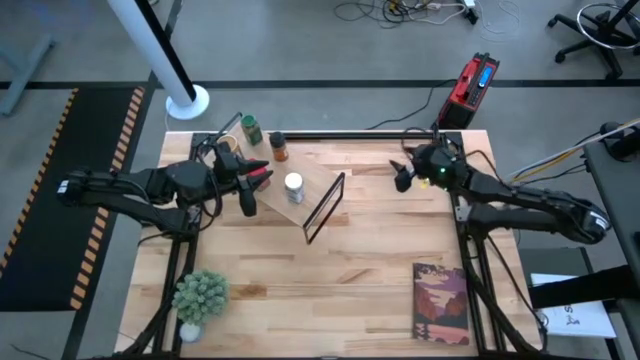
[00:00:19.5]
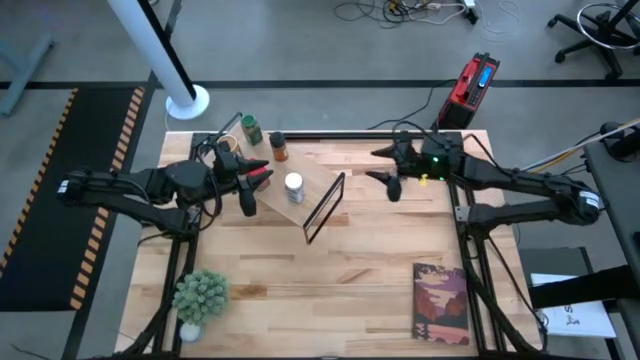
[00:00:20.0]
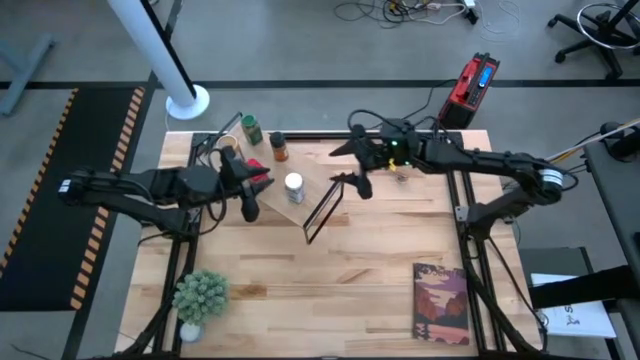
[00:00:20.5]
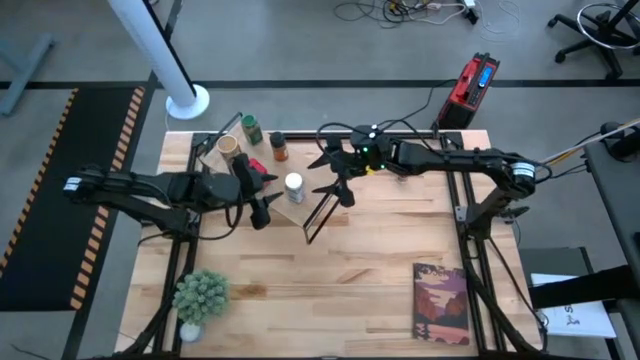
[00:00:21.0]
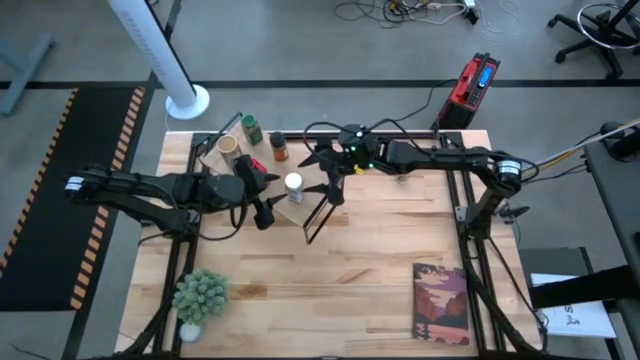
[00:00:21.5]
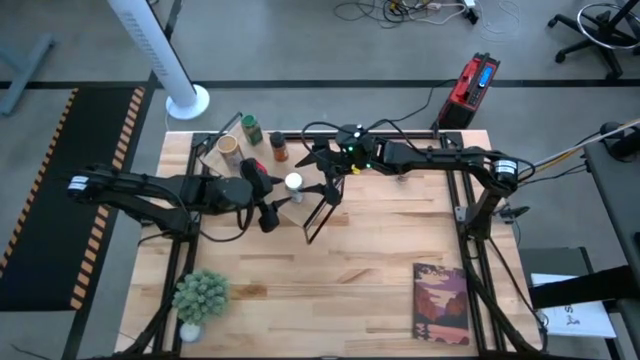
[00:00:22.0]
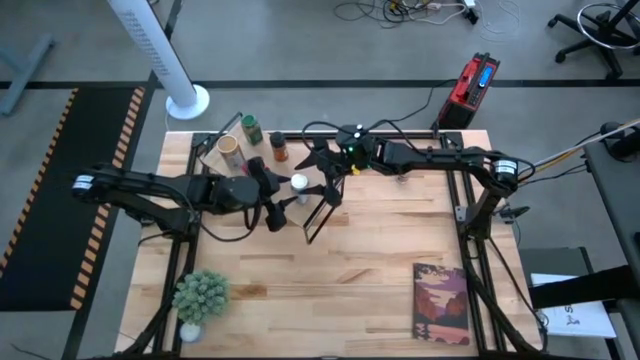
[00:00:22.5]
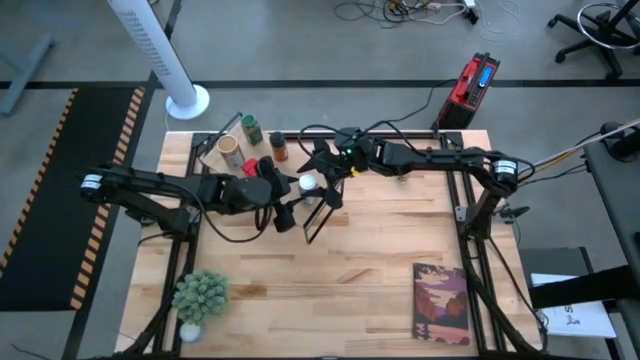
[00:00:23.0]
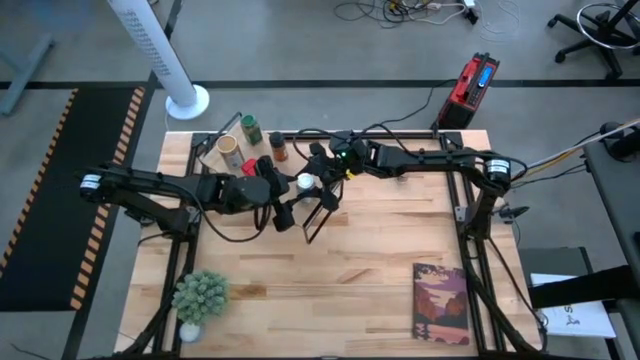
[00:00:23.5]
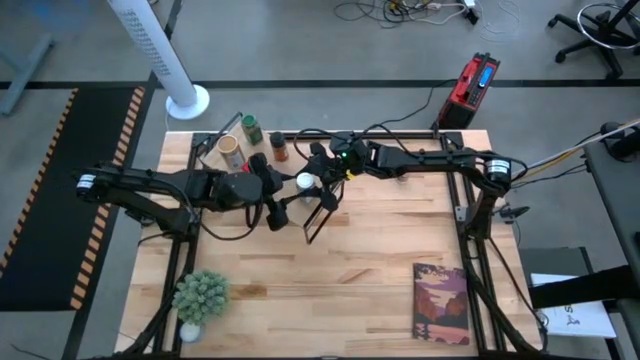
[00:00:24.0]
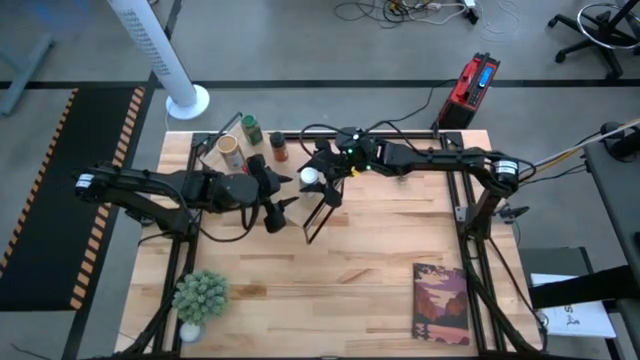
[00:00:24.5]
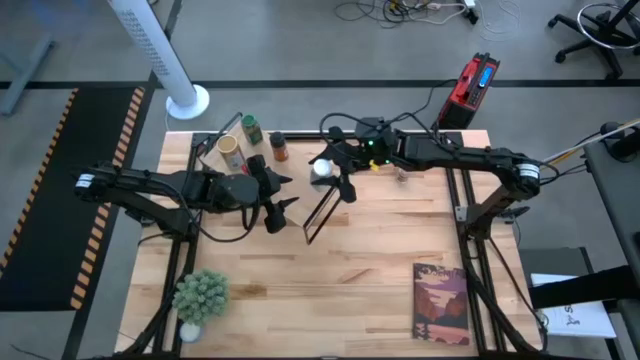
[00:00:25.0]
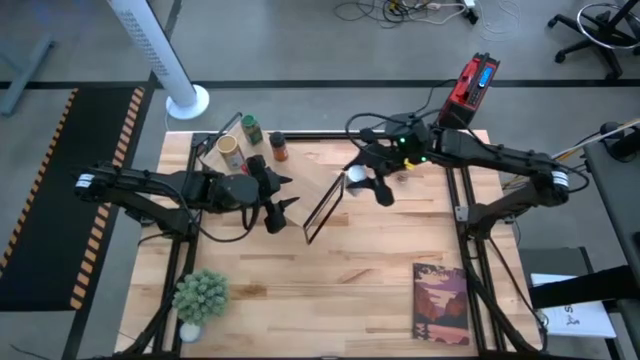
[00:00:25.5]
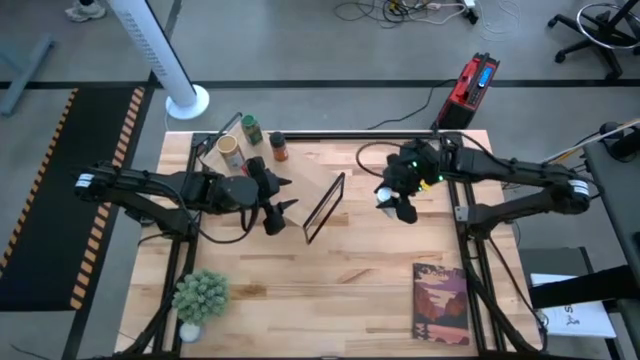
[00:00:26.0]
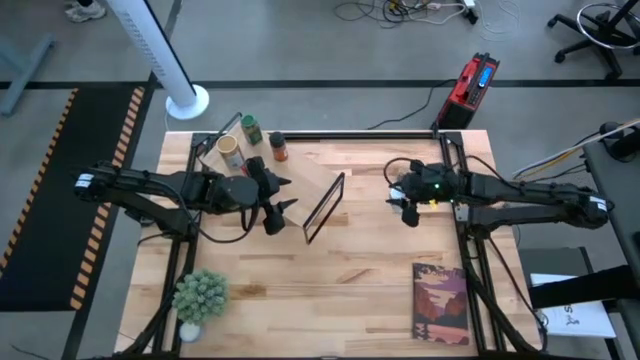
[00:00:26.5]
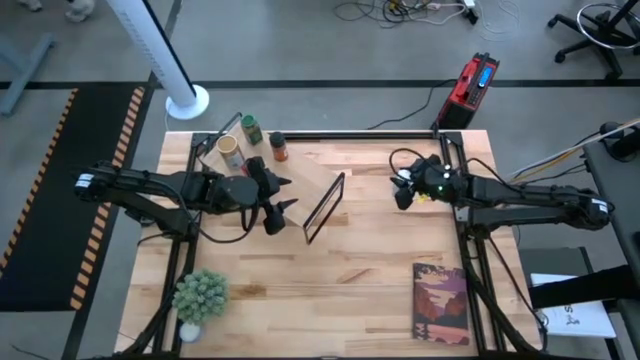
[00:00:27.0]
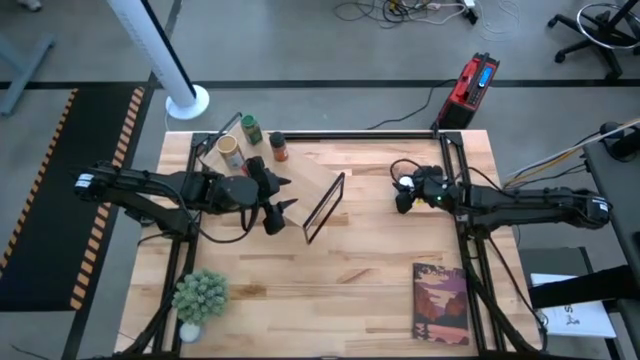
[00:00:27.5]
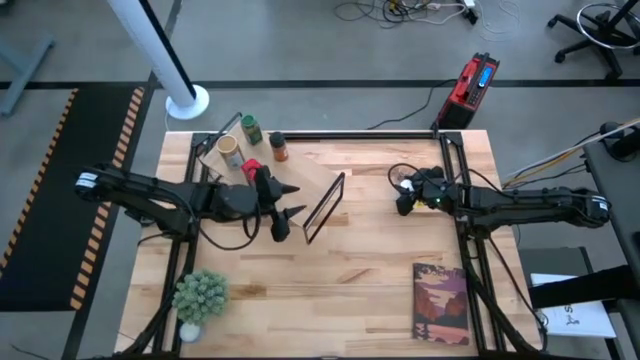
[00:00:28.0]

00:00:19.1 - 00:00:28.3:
Task: Shelf spices
Remove the white seasoning bottle from the shelf

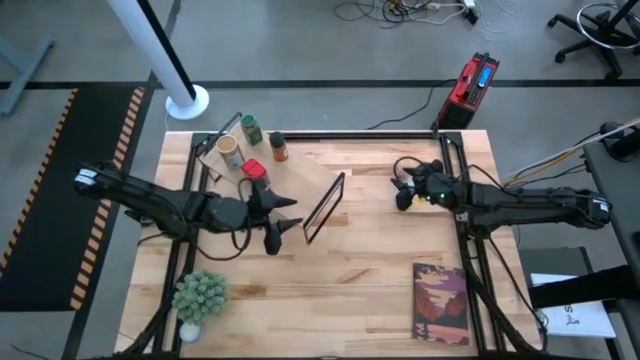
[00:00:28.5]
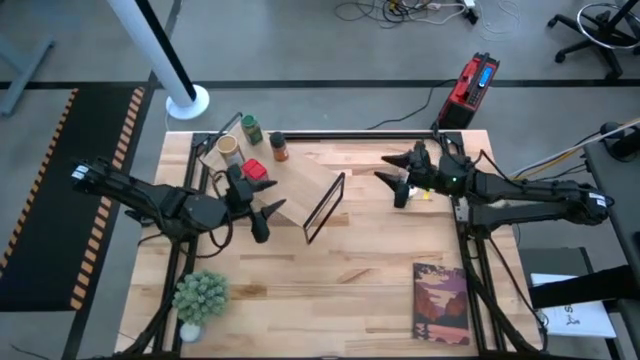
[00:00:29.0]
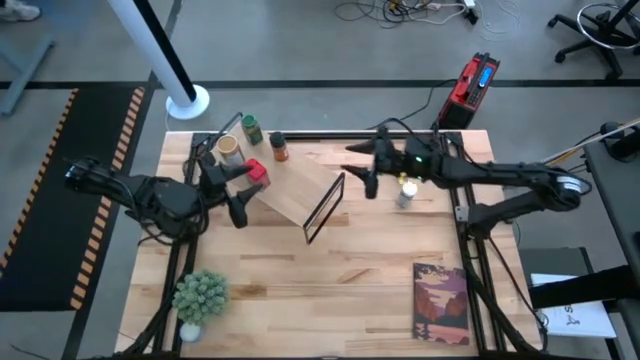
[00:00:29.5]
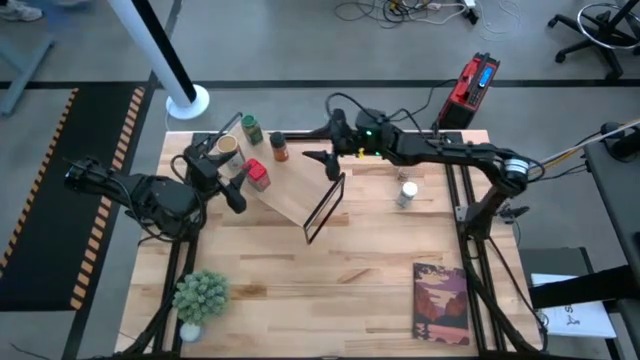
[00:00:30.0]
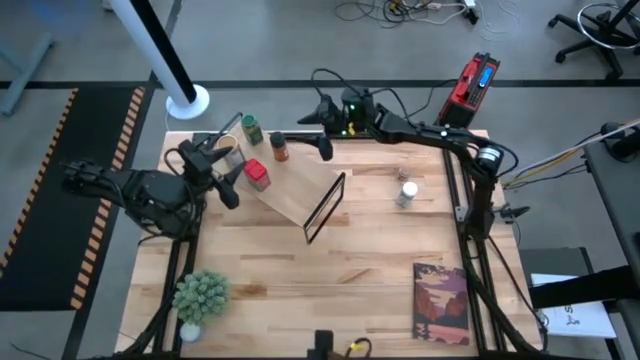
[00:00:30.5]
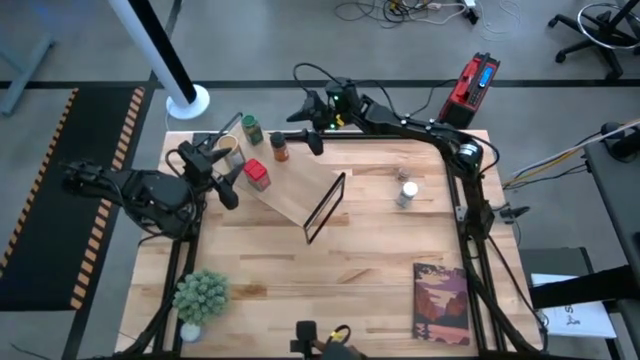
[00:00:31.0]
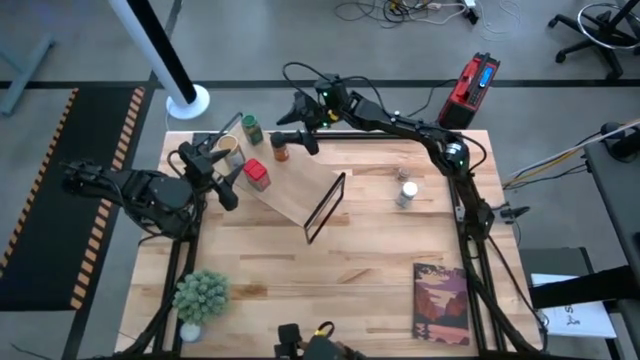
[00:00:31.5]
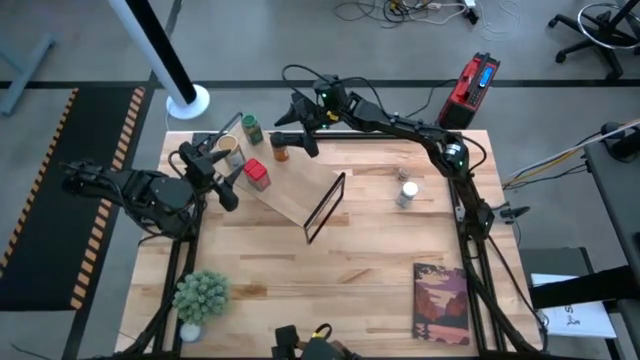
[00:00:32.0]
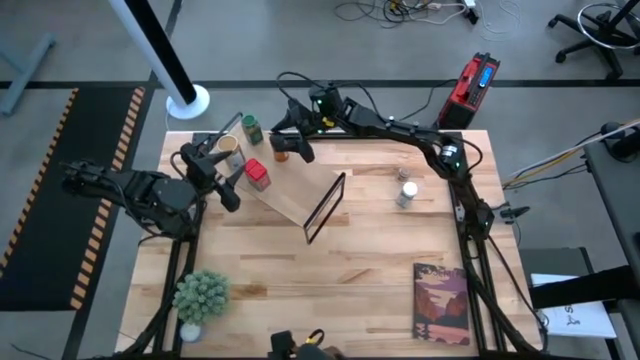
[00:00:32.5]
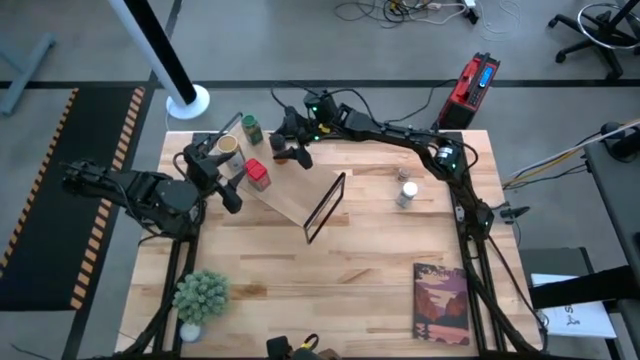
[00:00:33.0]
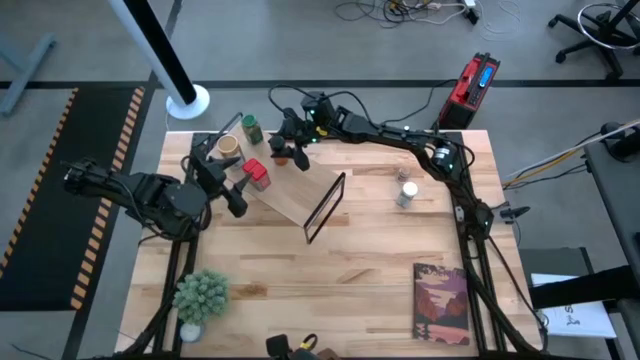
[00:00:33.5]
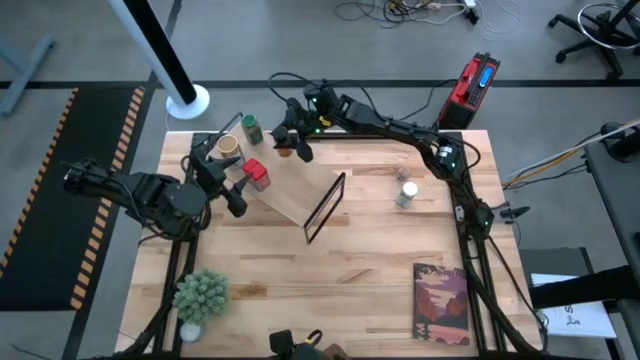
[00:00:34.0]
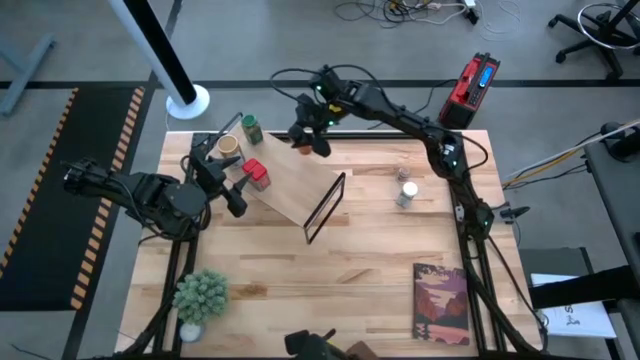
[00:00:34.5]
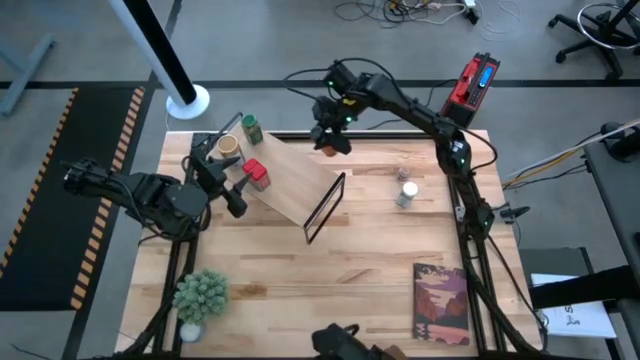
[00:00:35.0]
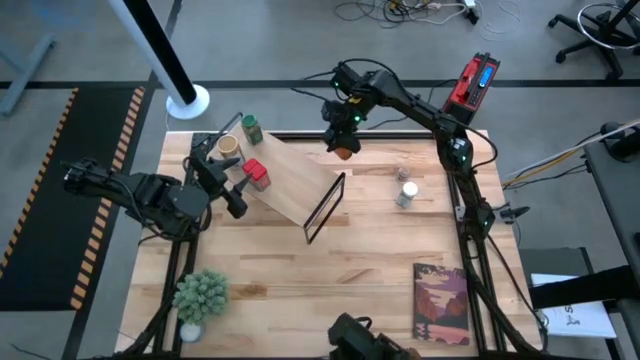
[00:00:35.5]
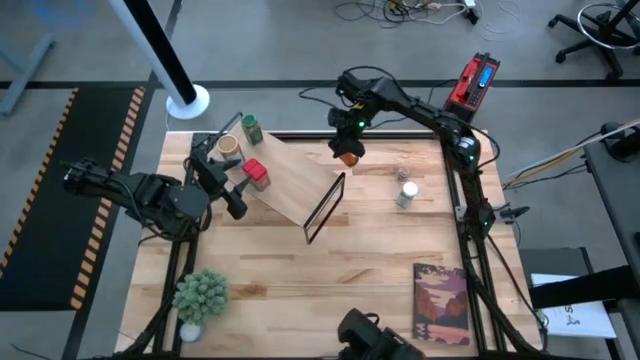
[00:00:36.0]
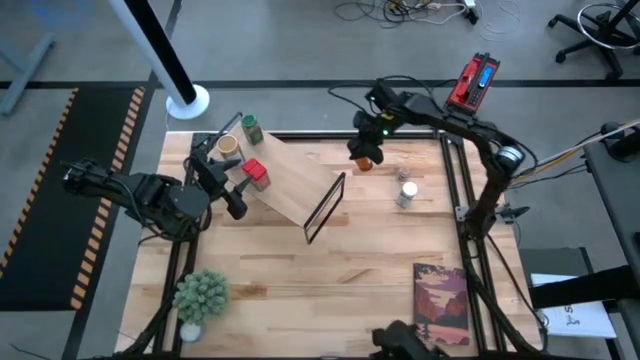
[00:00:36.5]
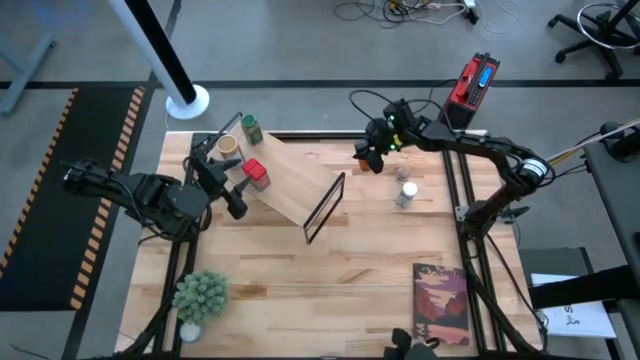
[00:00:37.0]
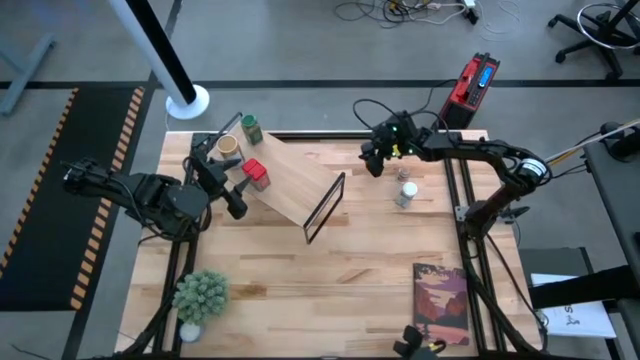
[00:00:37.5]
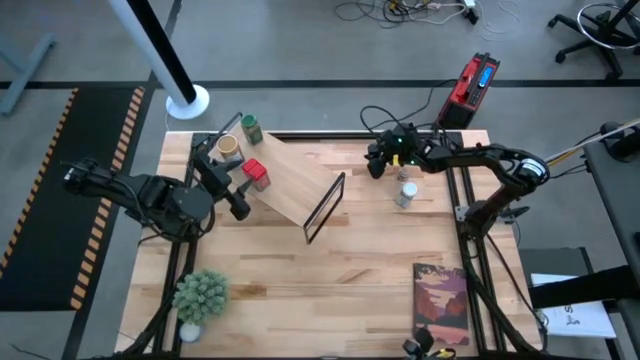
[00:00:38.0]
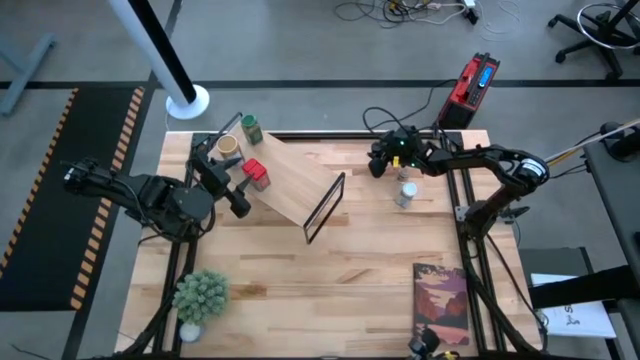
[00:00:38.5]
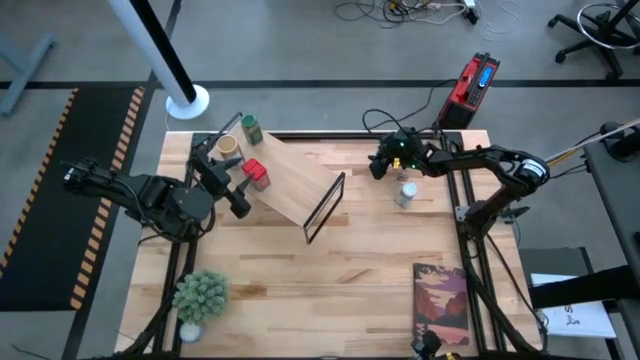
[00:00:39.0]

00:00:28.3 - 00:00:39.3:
Remove the black seasoning bottle from the shelf
